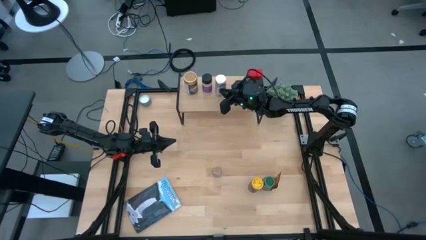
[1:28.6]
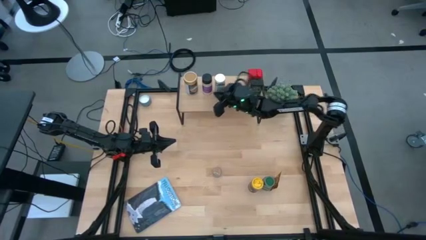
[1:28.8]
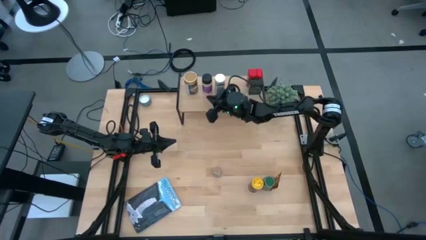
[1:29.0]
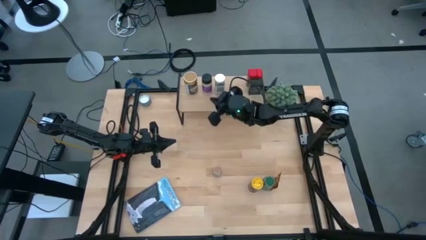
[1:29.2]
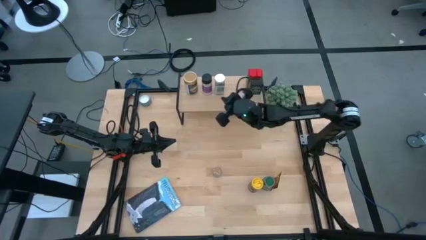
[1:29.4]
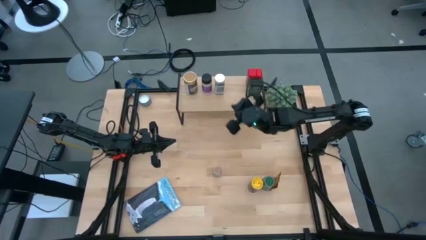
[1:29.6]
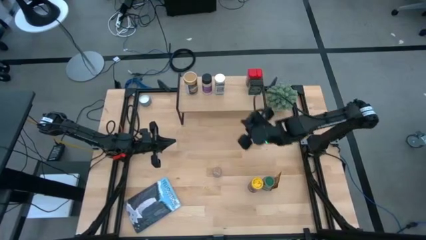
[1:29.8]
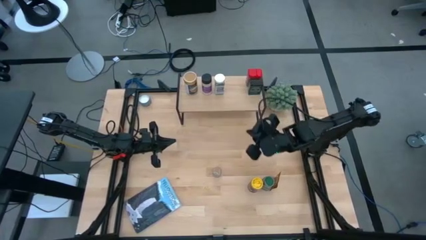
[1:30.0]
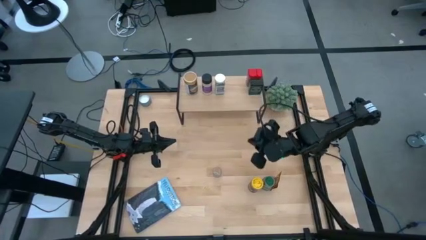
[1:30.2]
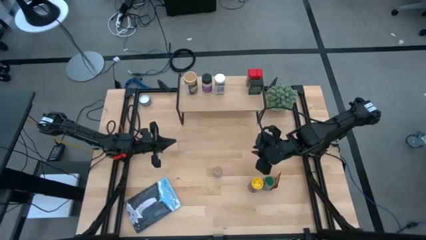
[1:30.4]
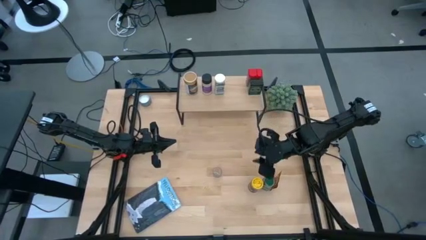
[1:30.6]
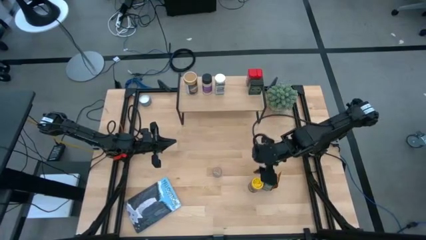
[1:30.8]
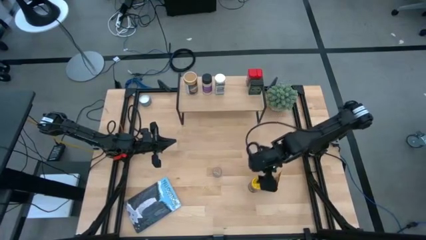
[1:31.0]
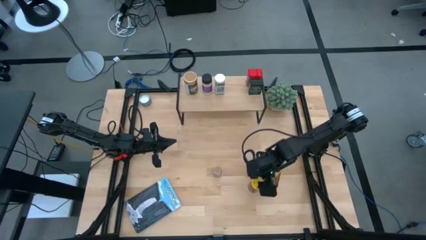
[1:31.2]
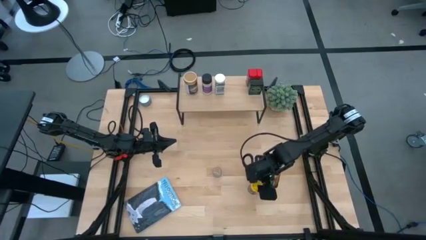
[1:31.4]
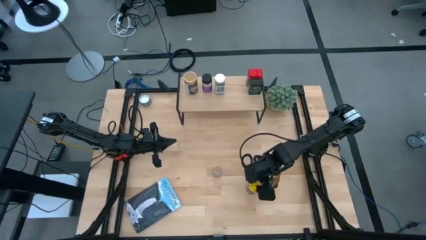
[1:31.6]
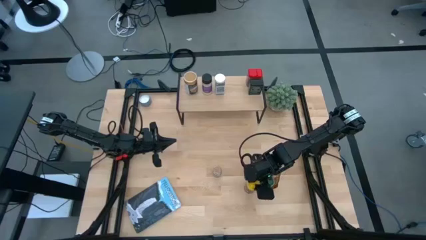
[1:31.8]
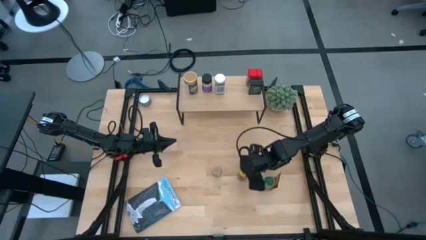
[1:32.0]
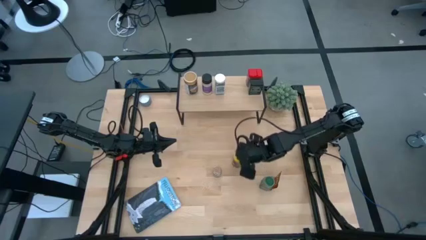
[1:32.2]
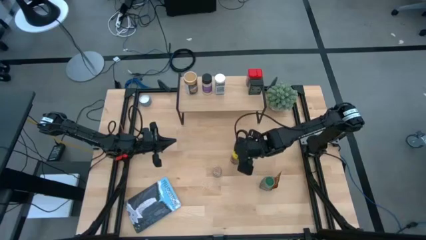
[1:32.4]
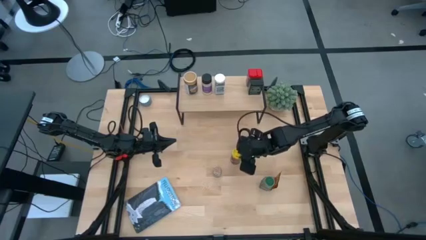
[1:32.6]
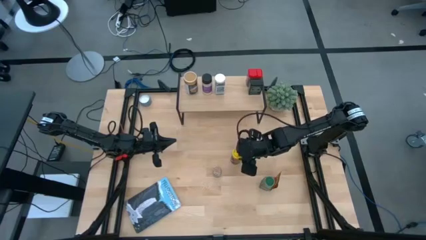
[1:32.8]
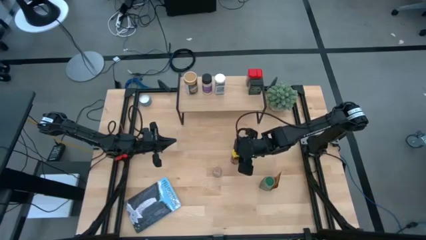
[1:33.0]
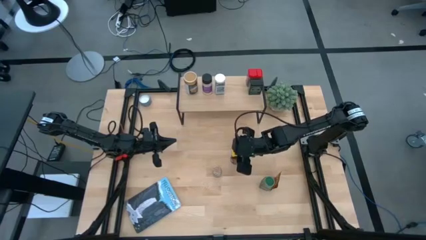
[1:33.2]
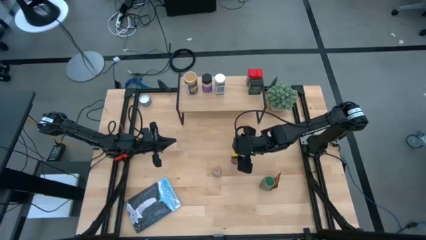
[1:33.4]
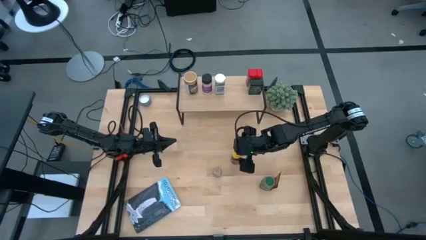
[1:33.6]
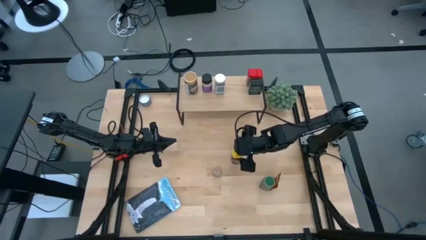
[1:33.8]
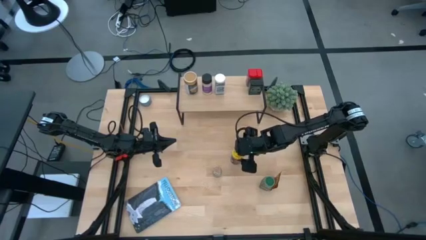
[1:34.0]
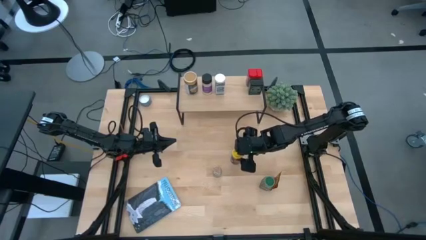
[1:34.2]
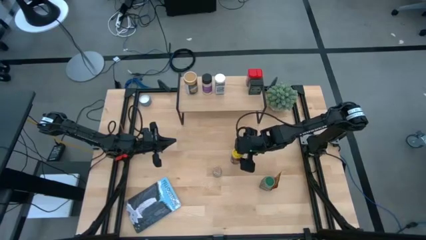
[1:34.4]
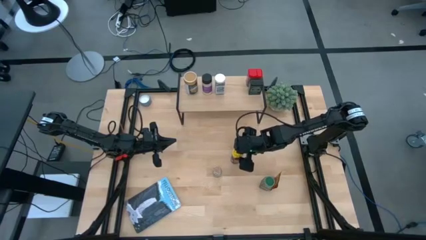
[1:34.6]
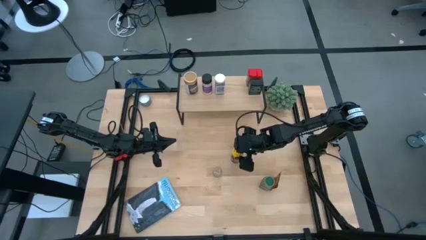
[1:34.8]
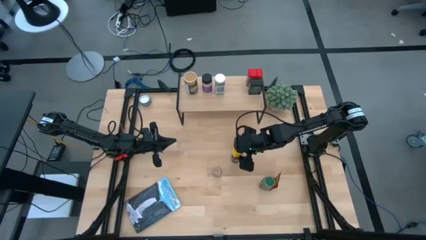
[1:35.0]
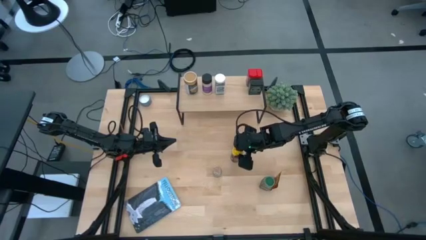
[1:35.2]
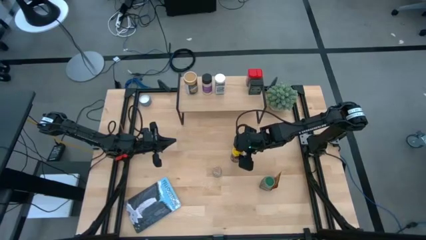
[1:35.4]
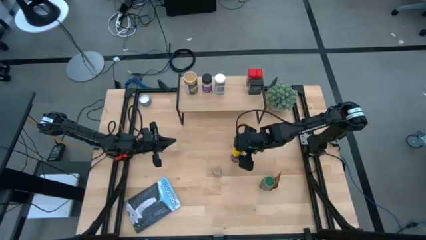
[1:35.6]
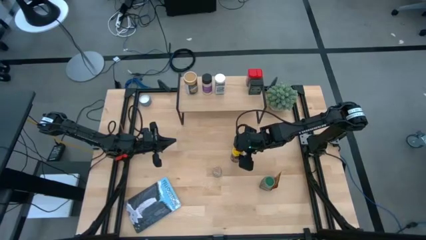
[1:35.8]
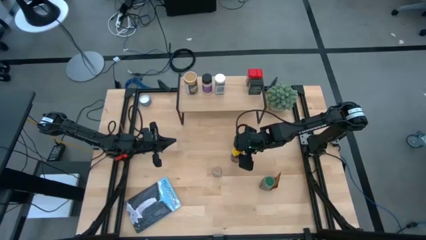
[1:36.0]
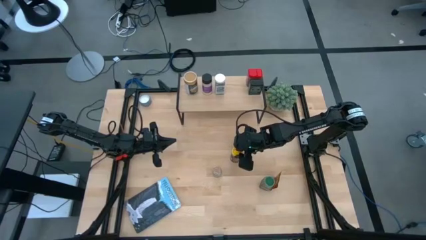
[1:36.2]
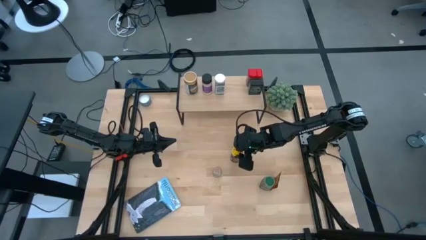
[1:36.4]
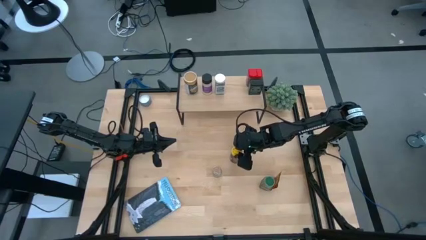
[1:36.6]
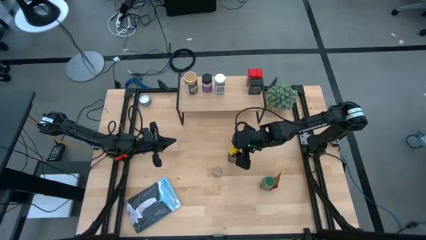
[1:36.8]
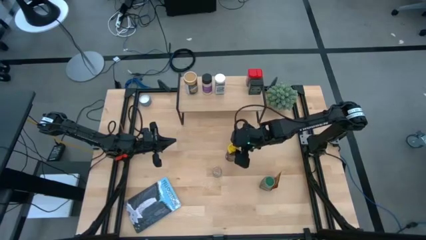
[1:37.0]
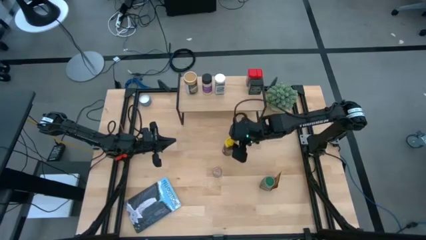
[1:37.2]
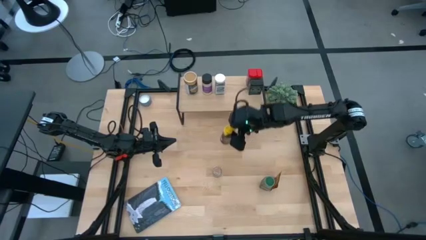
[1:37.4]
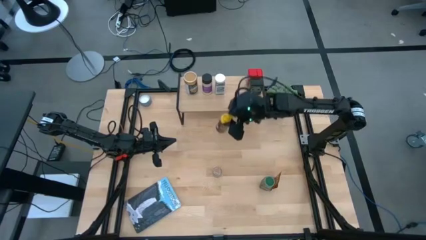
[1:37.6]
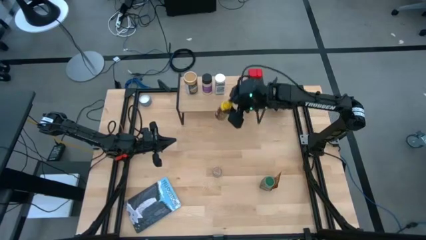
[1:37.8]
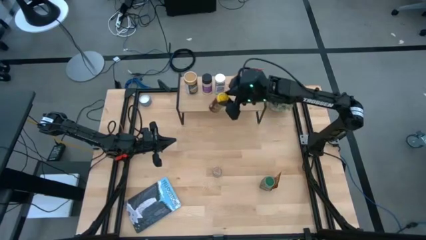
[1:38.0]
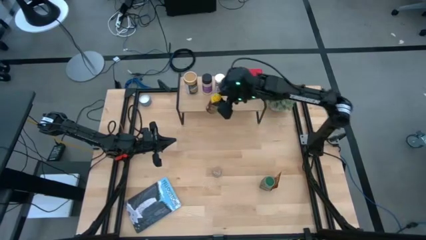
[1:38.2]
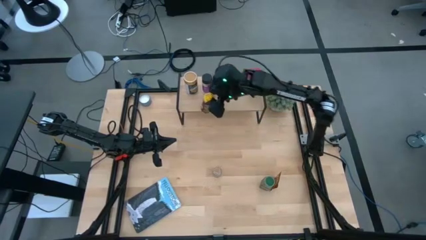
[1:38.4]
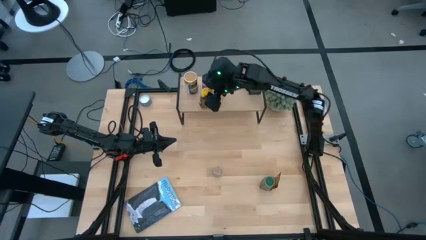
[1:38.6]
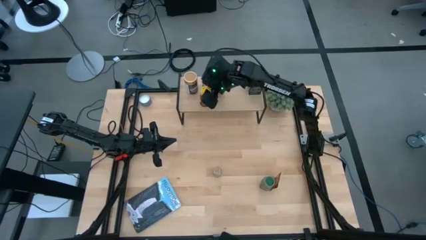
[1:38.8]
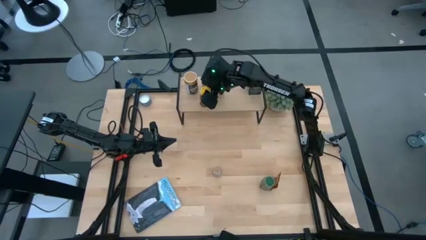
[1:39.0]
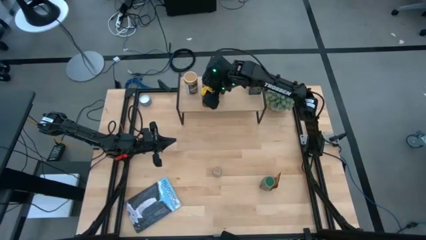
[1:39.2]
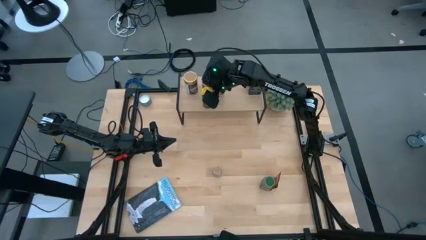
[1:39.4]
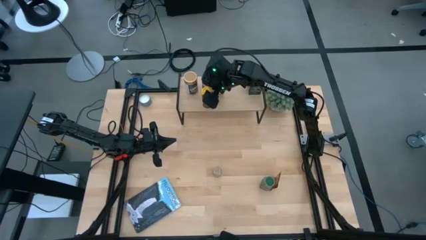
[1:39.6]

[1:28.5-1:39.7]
Task: Shelf spices
Put the yellow seasoning bottle on the shelf

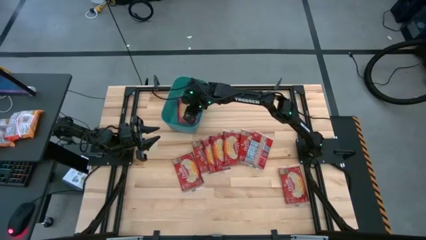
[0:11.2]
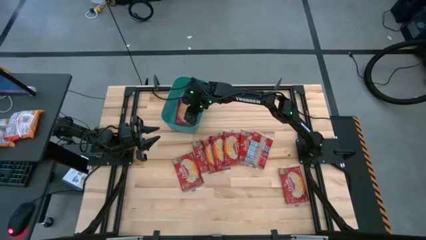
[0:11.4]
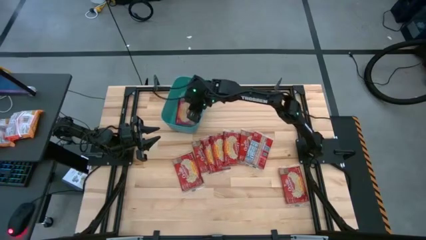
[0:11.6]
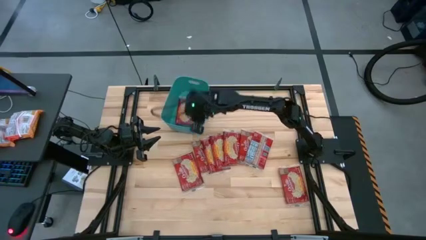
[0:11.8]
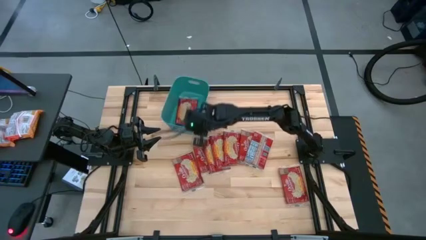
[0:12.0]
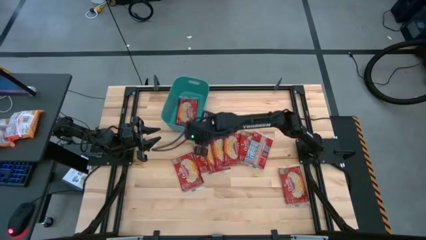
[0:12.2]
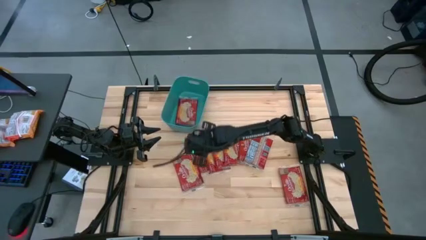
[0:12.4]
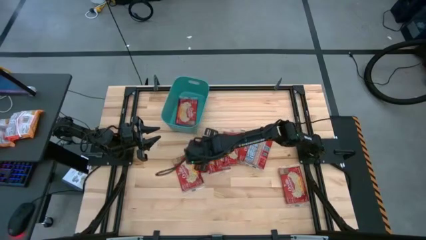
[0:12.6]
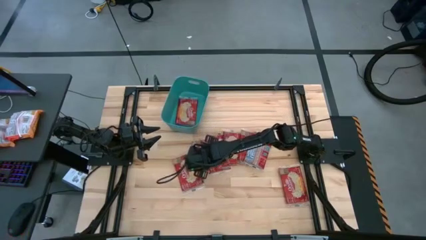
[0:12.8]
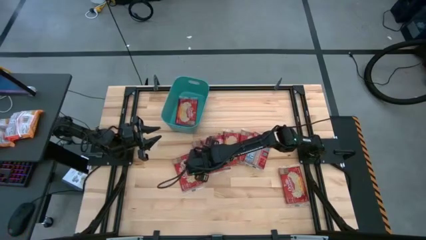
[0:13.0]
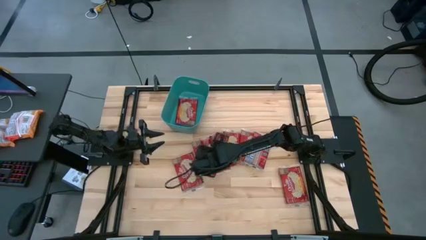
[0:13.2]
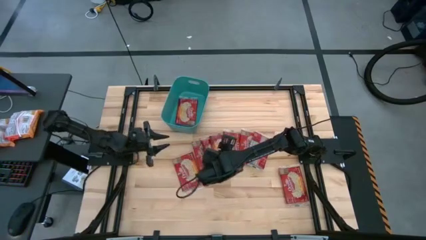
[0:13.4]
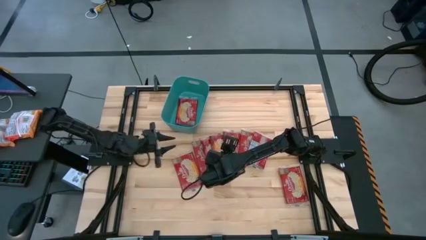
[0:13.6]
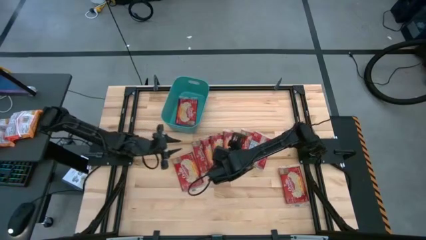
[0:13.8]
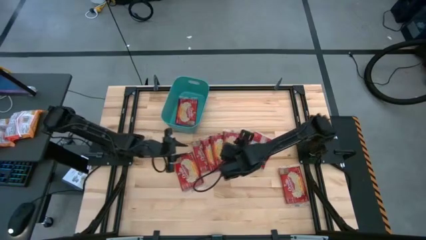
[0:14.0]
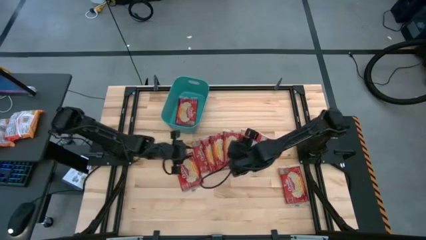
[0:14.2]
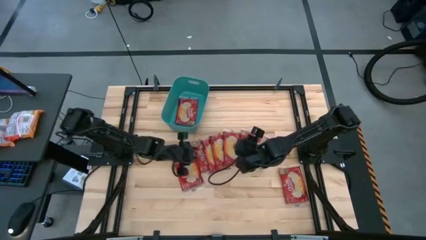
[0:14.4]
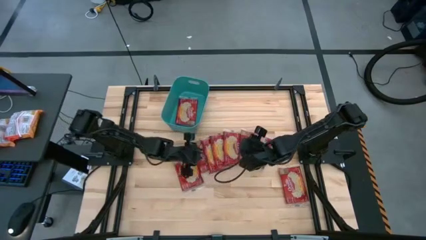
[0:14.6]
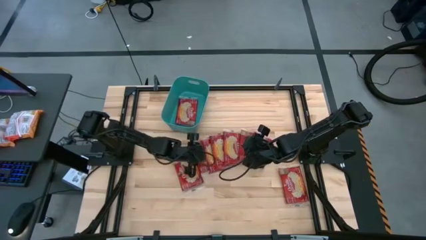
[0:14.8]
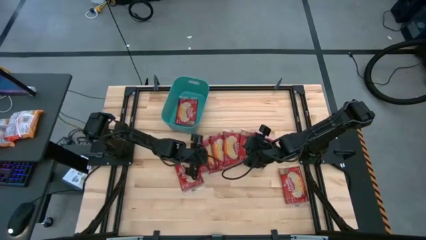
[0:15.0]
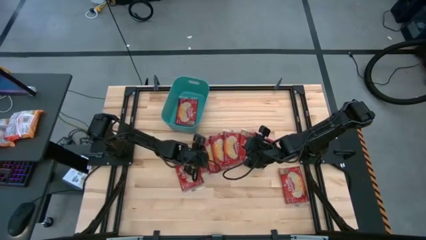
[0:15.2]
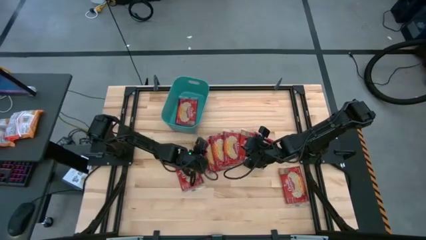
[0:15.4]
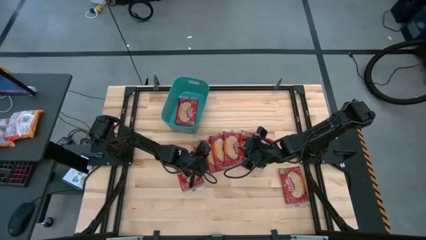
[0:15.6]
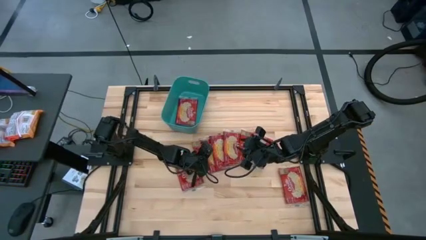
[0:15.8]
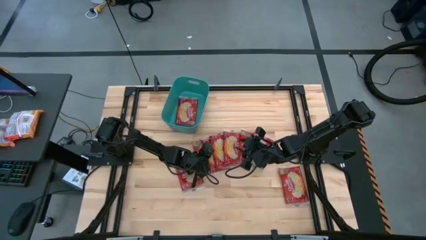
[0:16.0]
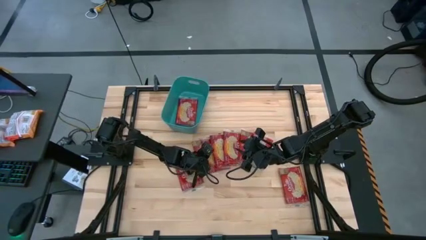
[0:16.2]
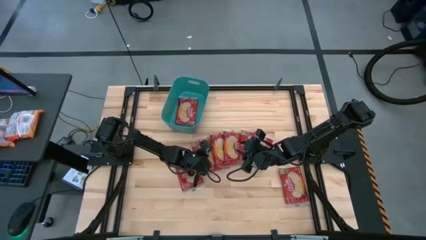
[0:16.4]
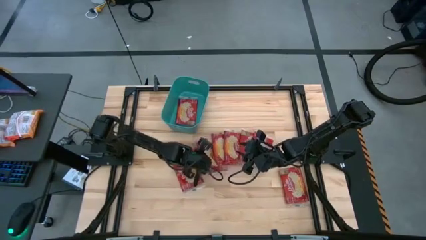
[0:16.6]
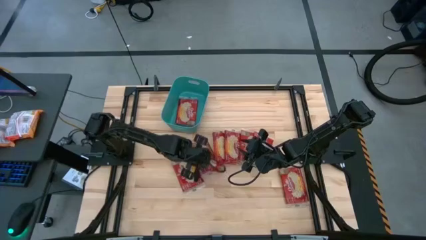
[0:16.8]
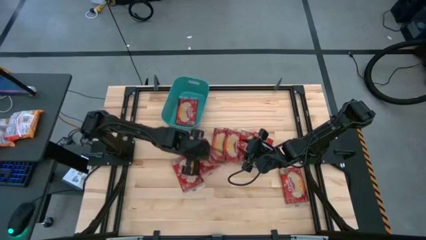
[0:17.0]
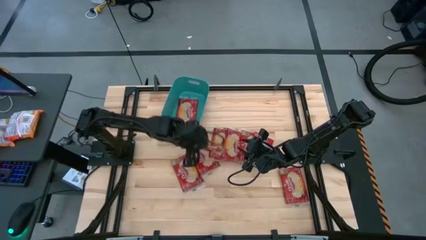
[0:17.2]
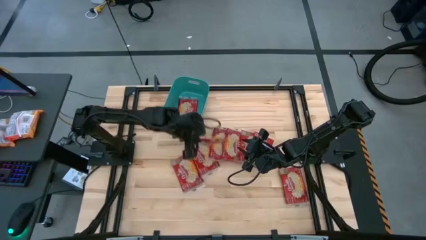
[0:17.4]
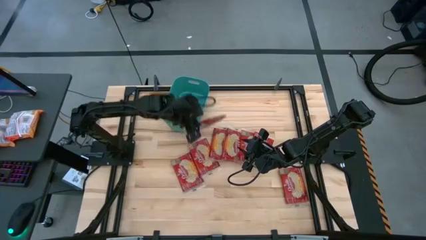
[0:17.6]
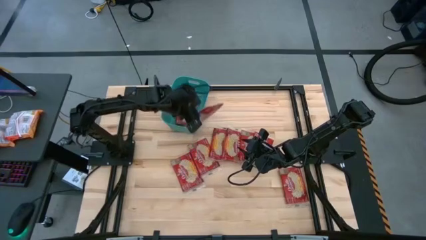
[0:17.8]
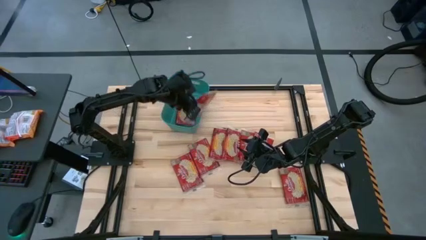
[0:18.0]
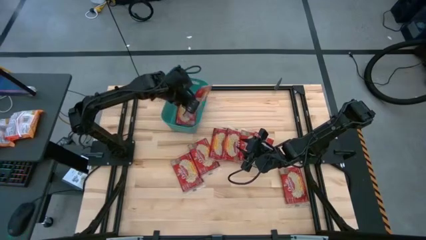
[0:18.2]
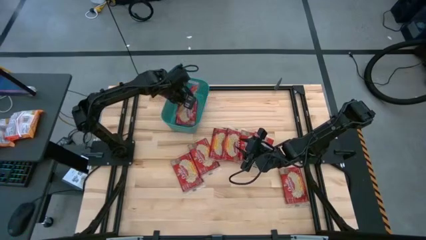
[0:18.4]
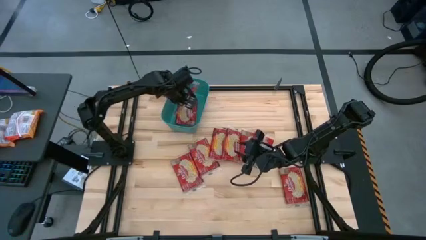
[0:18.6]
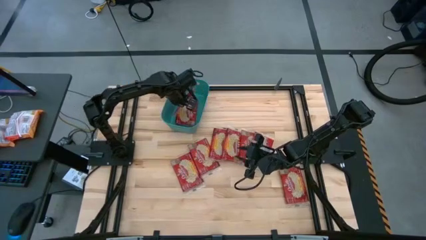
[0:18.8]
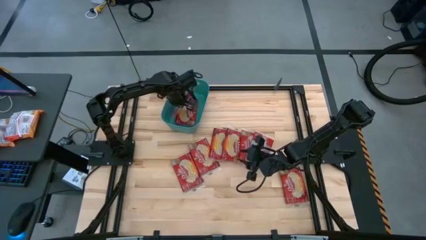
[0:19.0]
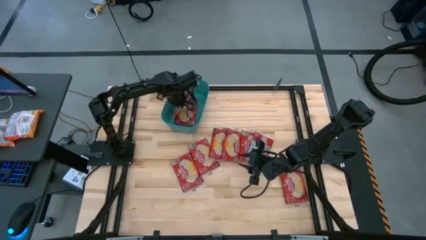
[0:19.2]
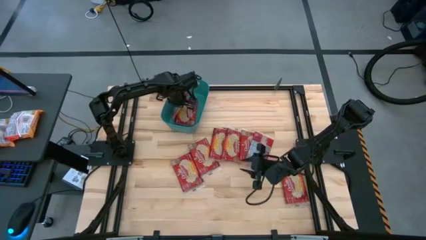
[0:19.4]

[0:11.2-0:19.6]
Task: Sort popcorn bags into baskets
Put the red popcorn bag into the green bin
